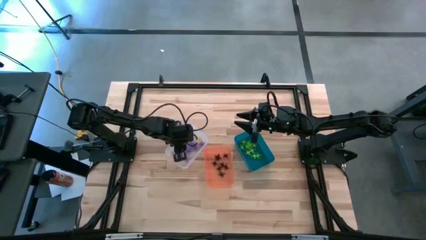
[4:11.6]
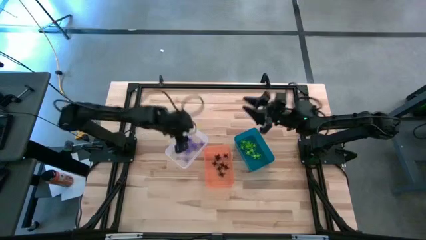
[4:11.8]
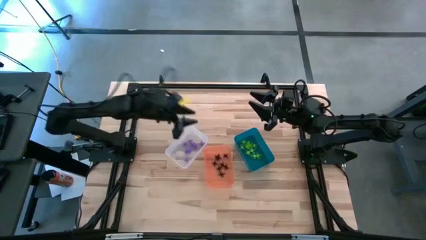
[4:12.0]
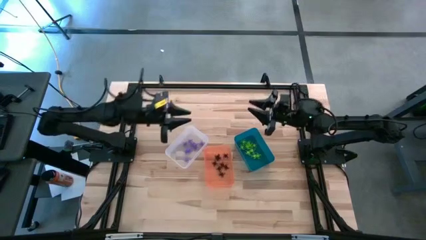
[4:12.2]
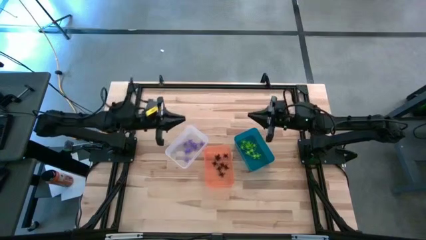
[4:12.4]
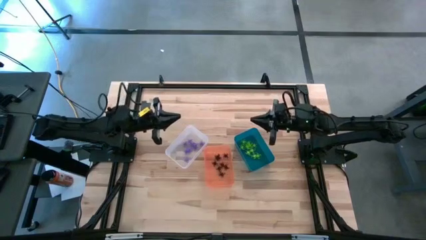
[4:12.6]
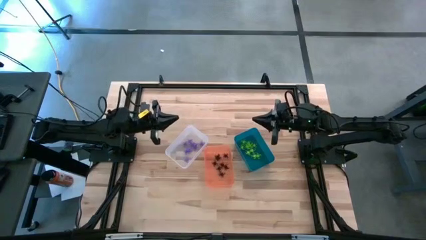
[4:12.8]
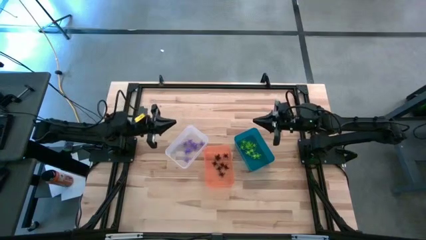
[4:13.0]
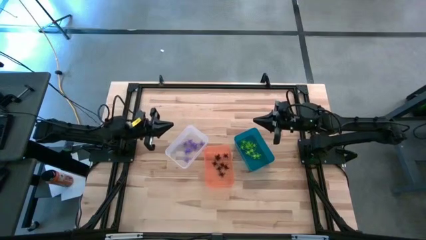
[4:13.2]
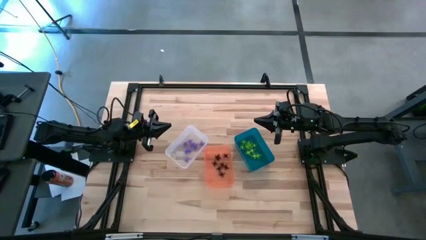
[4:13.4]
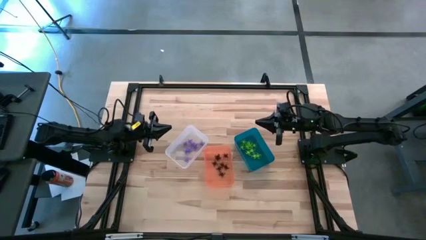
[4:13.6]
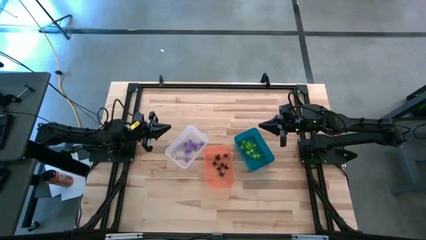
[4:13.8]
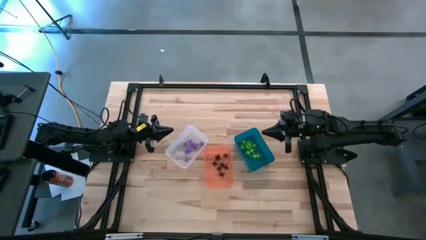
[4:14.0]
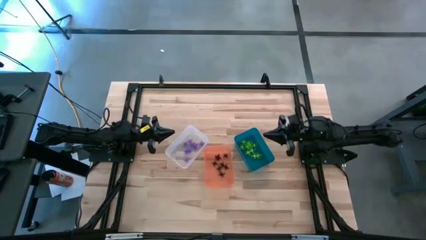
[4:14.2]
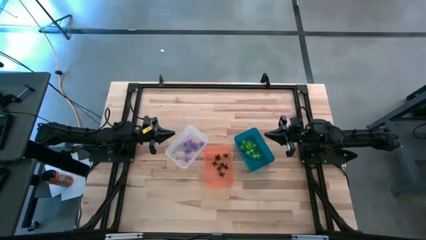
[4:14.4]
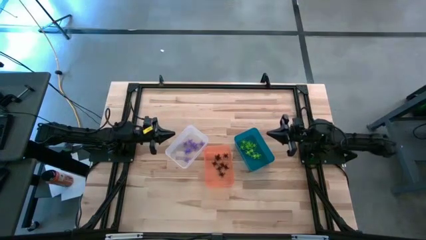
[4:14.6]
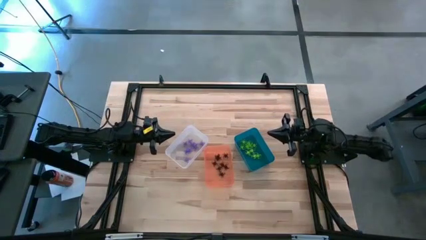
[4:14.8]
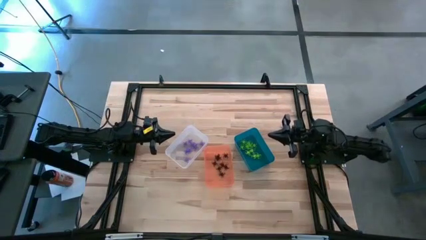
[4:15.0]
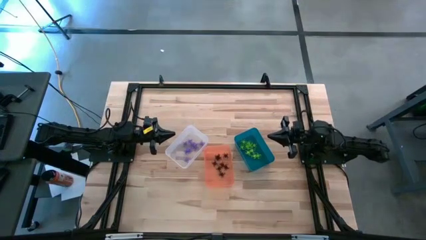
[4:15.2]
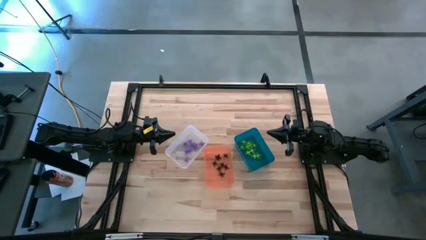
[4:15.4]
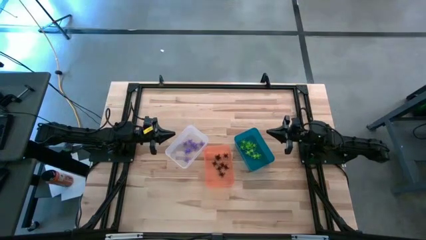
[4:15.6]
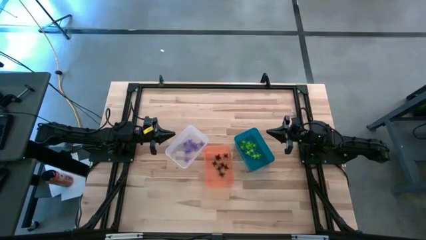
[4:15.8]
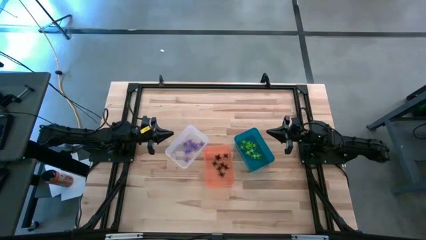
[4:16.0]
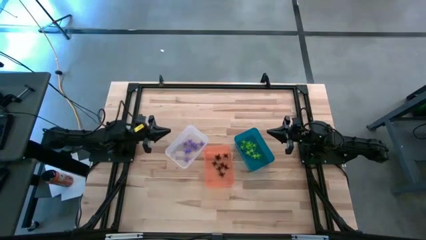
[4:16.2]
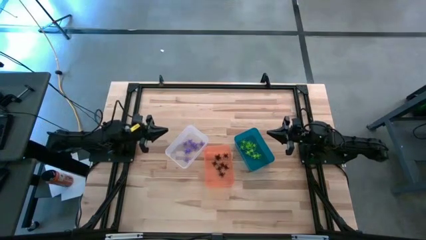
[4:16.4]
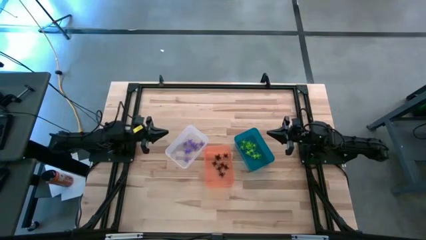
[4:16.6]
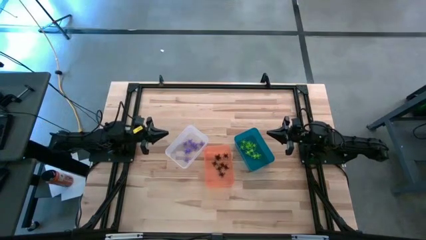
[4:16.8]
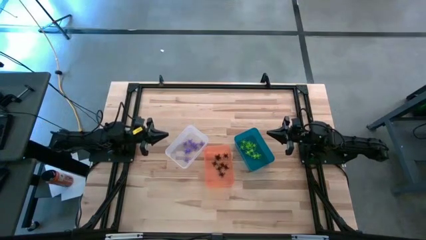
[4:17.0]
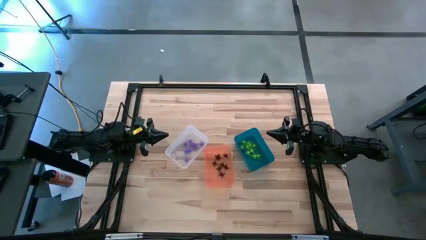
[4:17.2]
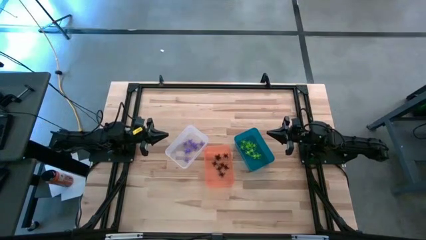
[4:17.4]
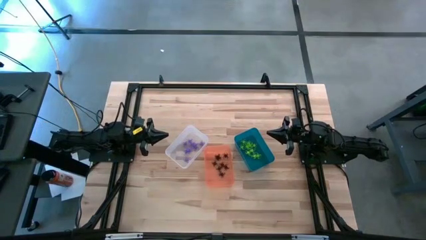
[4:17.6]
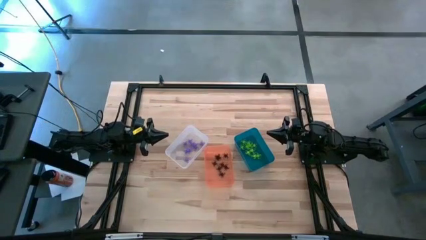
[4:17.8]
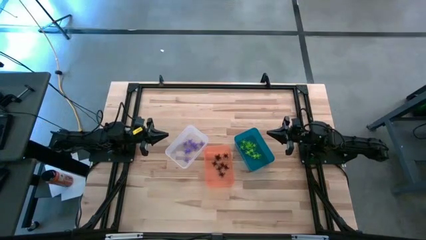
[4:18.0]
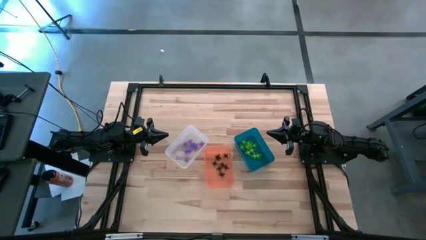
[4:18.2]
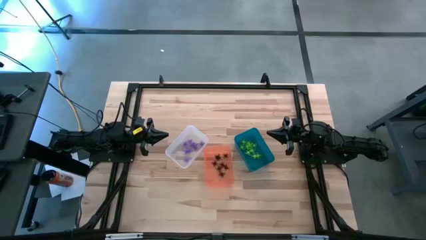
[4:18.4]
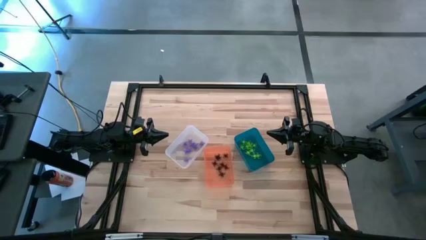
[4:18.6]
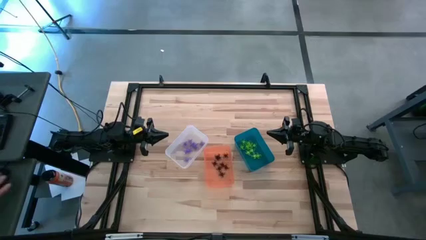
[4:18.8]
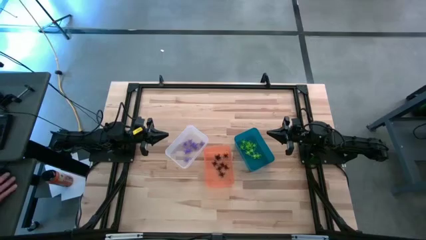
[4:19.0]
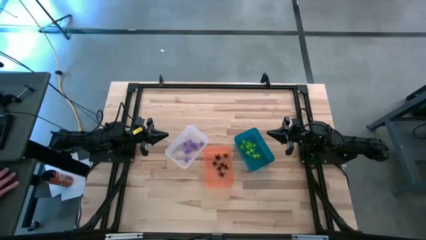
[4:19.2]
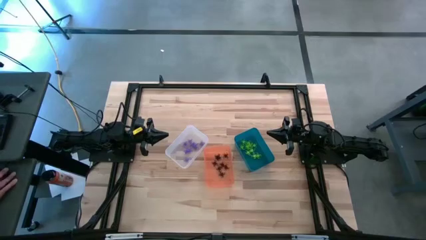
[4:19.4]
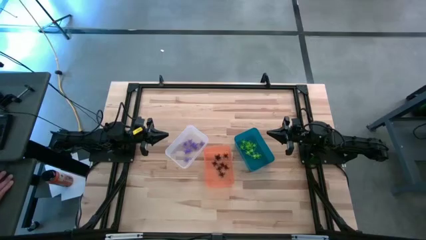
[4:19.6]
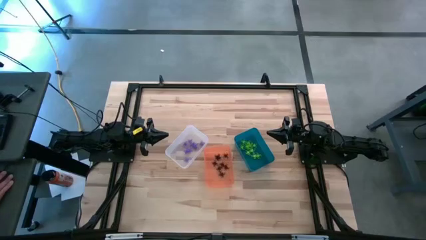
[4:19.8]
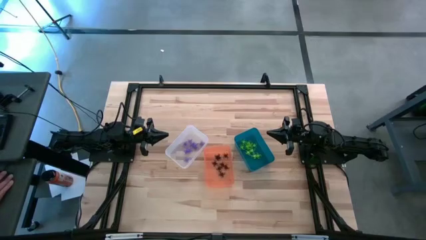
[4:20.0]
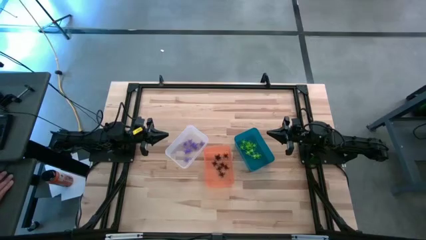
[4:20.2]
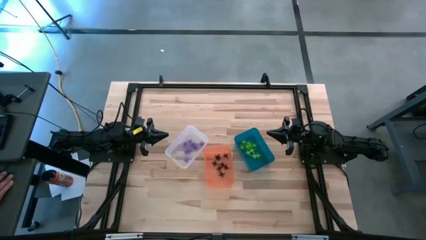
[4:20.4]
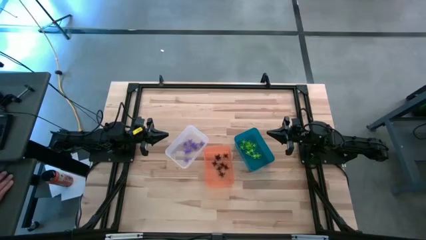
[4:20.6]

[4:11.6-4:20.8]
Task: Sort Halloween decoration
Return to Home Position

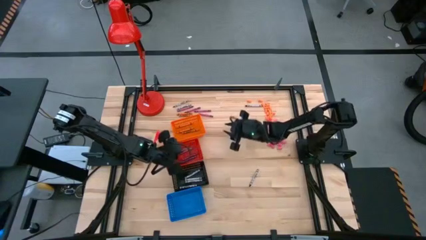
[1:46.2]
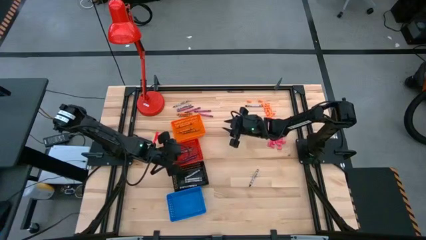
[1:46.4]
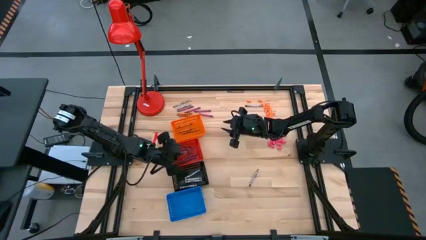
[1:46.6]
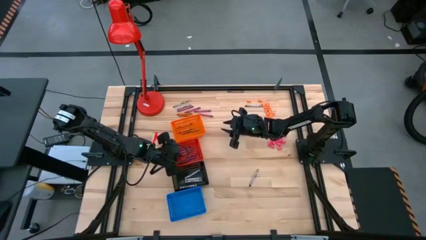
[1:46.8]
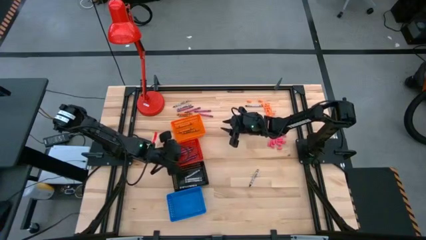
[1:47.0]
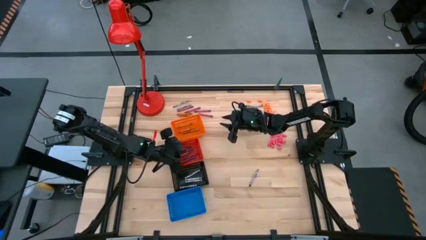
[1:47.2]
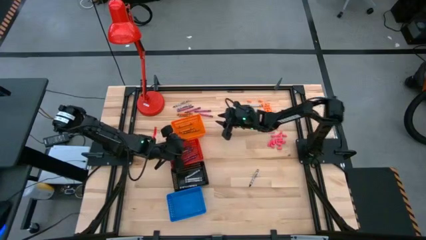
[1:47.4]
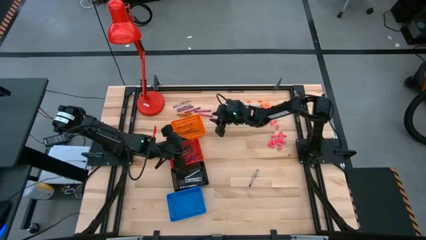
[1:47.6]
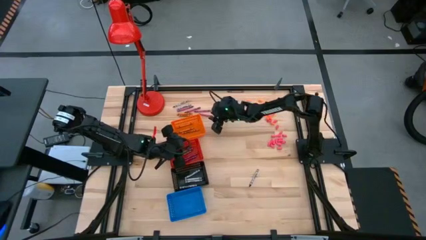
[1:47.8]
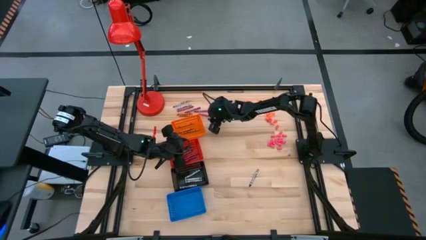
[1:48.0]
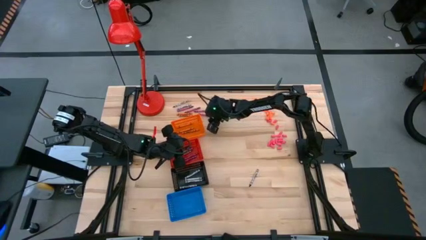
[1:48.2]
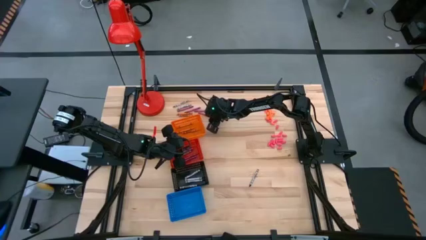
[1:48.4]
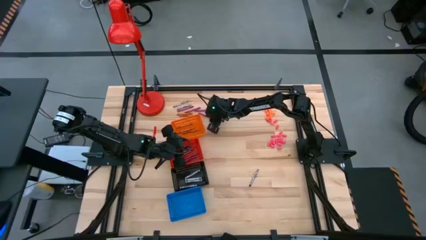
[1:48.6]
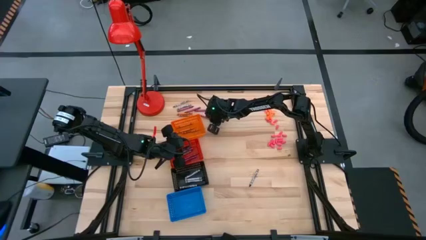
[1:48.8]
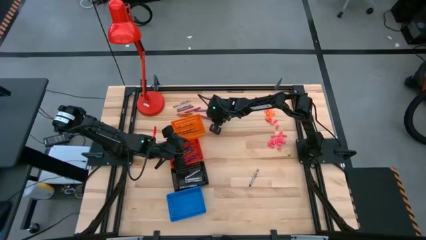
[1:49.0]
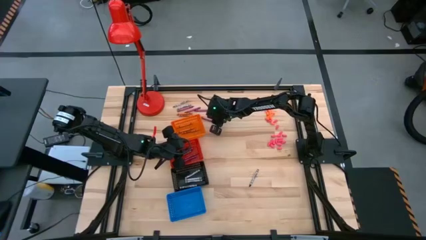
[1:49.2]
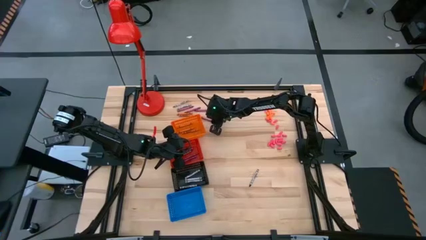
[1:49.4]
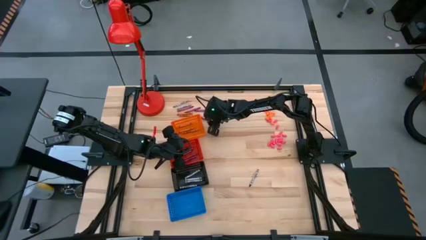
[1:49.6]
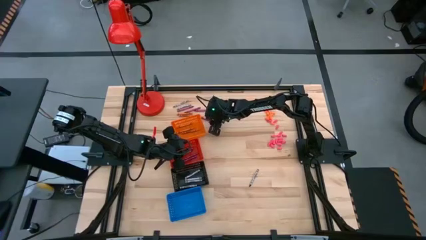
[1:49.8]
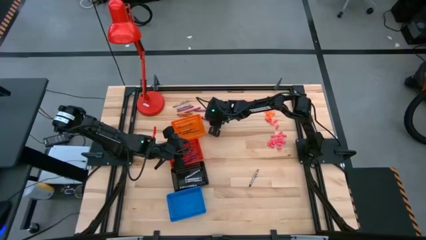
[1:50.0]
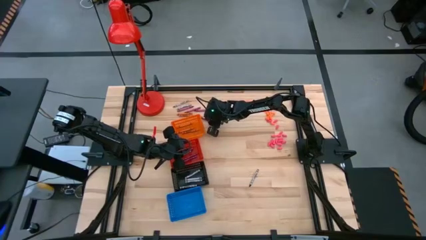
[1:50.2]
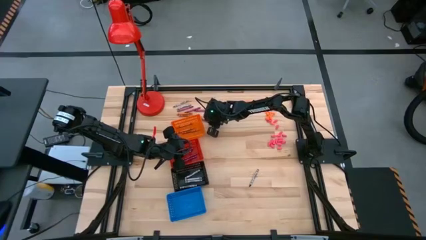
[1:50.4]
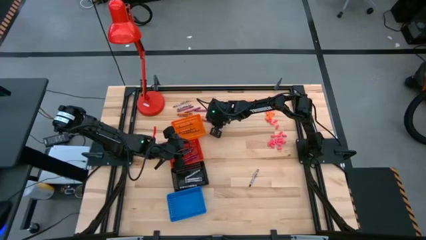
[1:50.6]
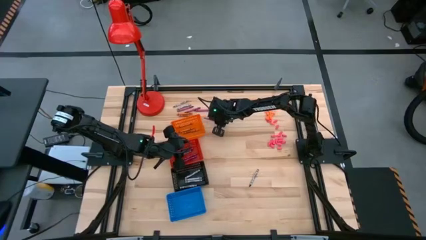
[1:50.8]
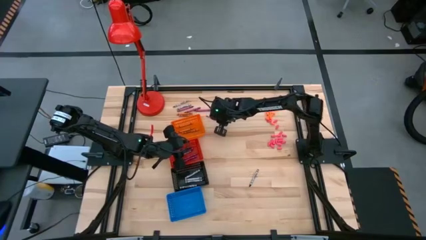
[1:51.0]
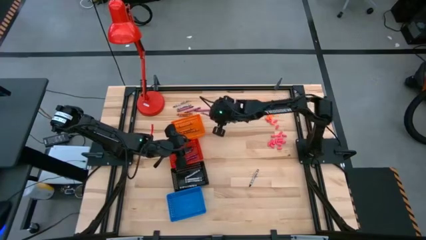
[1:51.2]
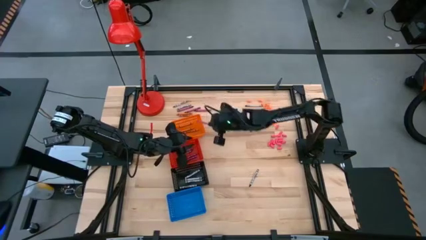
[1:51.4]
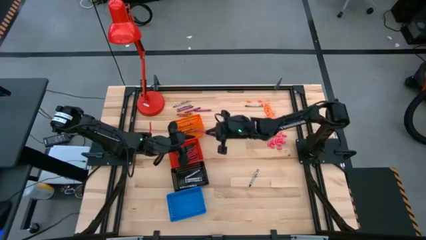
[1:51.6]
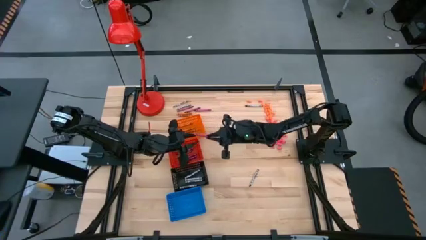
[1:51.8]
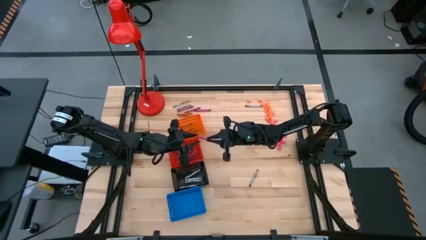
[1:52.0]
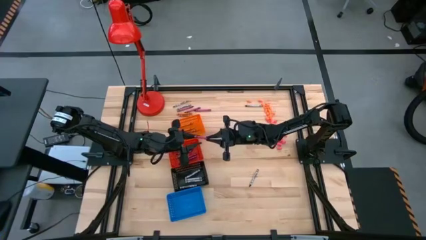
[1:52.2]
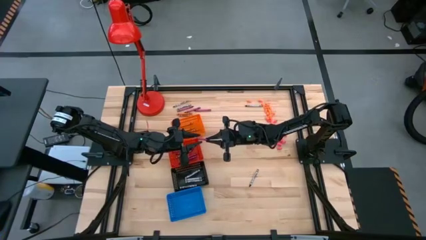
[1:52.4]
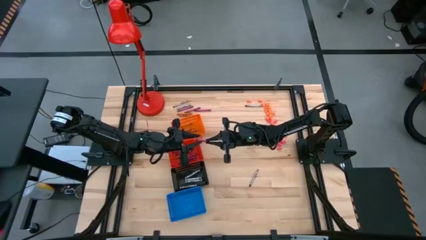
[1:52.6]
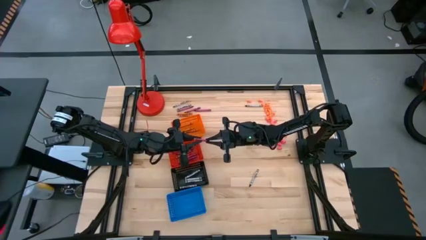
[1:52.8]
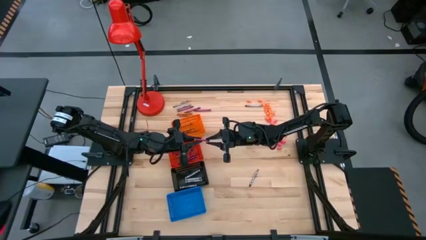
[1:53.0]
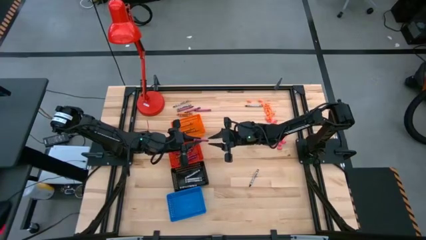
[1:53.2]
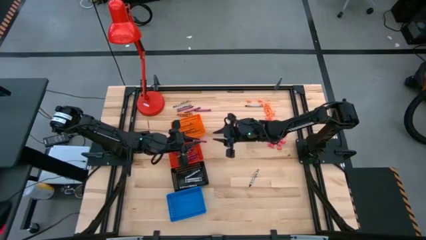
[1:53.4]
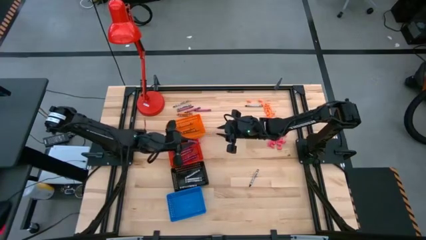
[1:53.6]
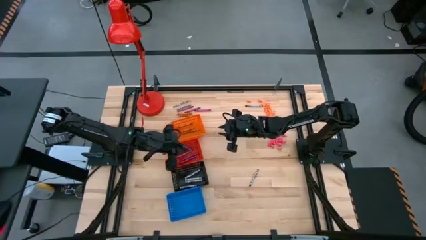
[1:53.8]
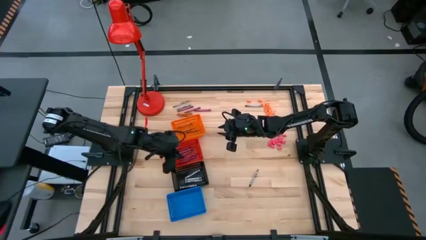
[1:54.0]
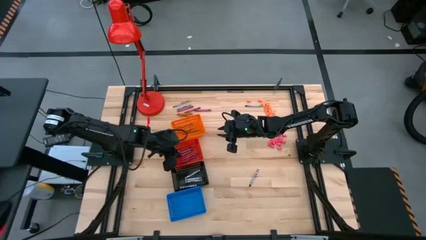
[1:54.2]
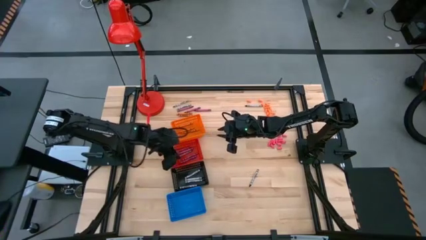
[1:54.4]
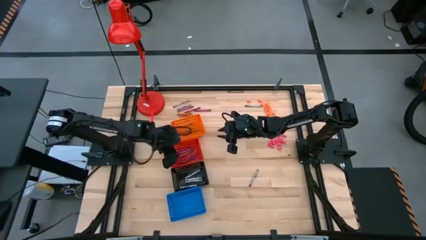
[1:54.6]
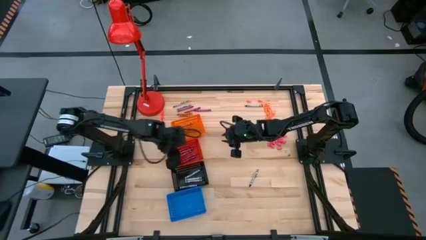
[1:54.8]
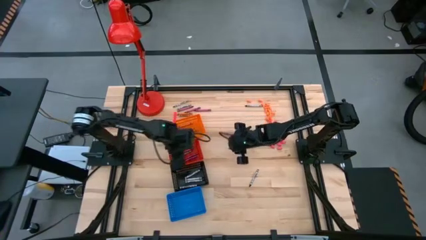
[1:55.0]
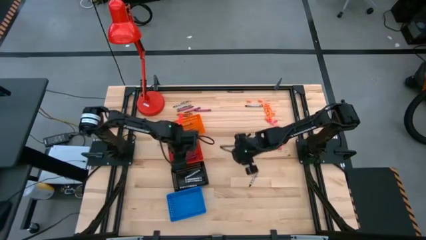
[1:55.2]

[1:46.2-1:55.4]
Task: Sort crayons
Put the red crayon into the red basket
